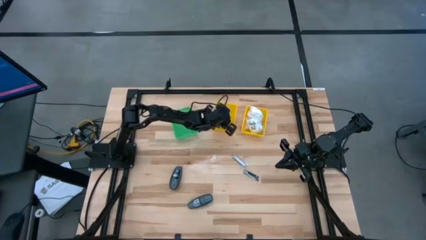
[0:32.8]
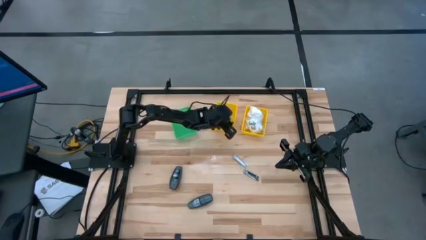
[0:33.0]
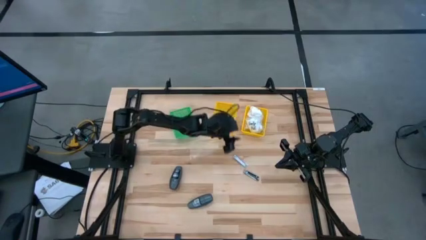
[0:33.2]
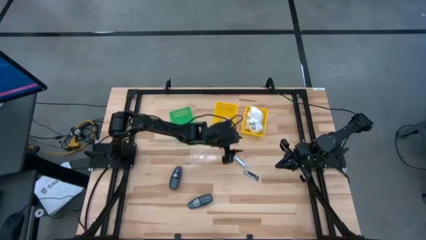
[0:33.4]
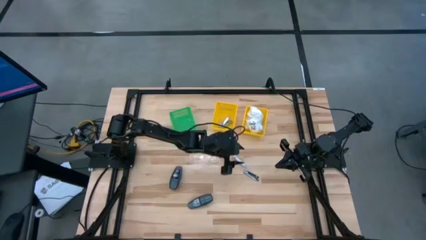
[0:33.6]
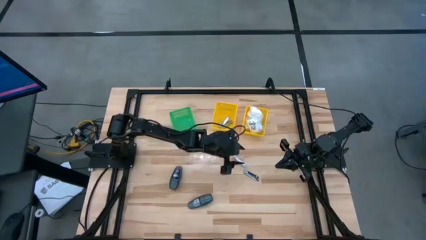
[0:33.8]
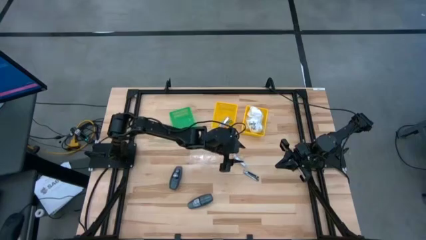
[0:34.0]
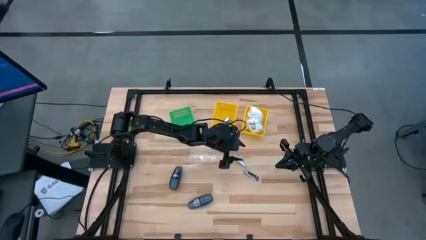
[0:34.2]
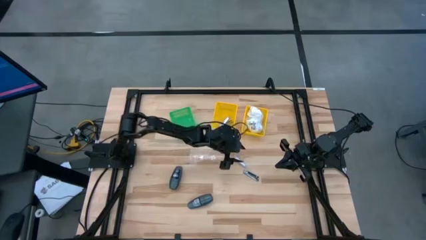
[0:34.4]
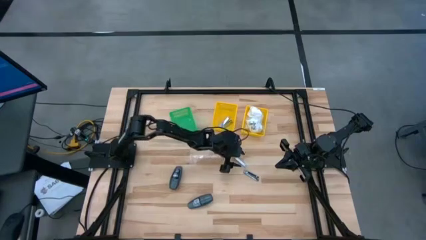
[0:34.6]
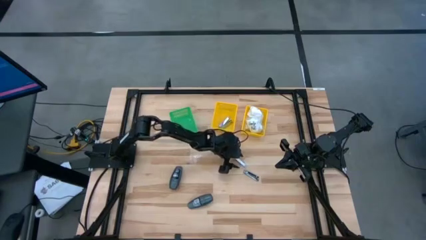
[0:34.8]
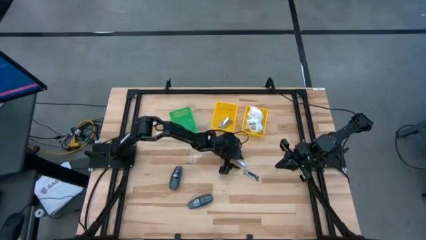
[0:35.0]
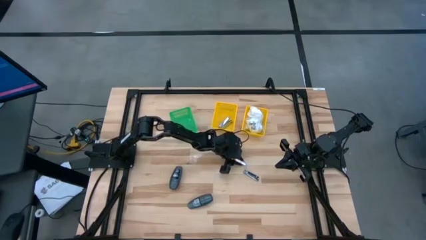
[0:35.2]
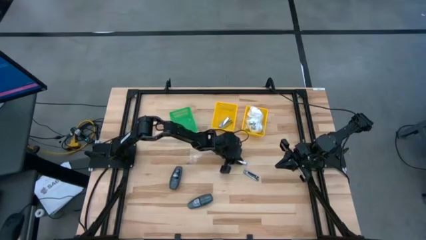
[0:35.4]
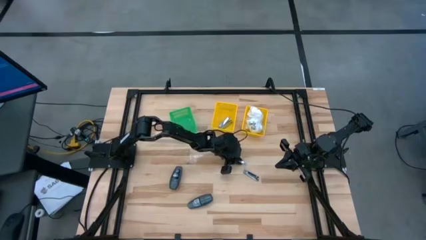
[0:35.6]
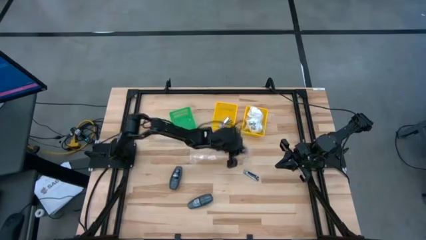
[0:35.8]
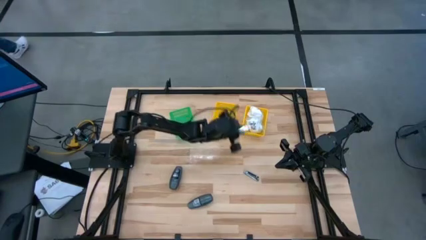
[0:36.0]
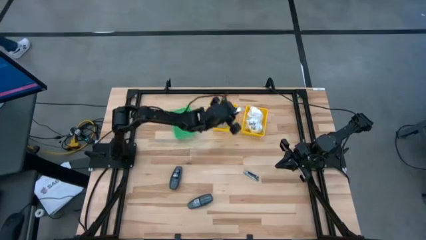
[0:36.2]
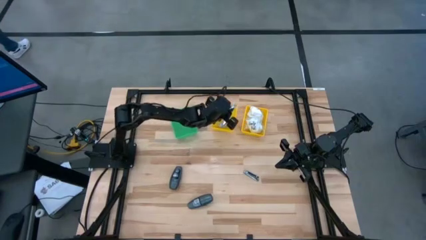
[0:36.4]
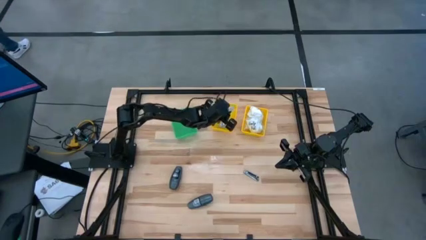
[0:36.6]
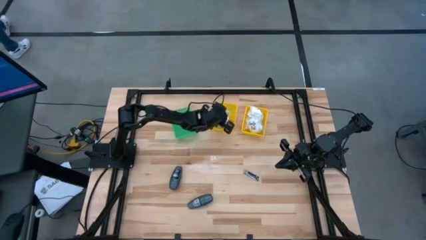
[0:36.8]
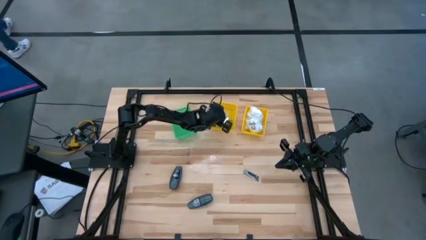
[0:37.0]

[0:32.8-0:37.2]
Task: Pick & Place Travel size toiletries
Put the silver nail cutter into the left yellow bin

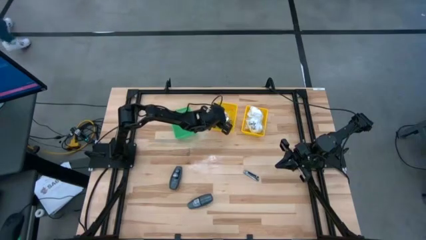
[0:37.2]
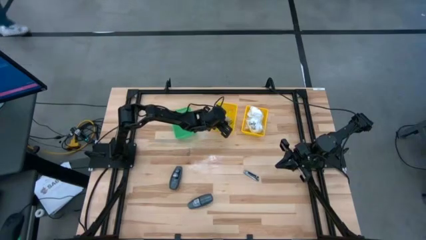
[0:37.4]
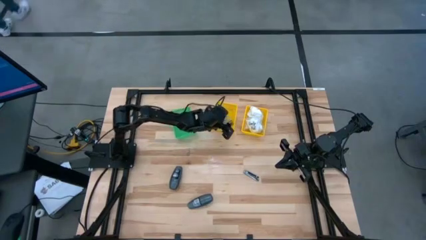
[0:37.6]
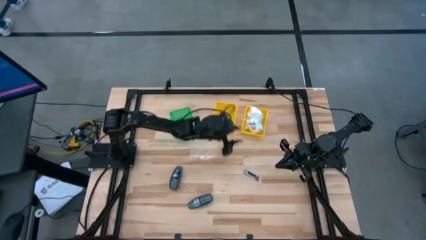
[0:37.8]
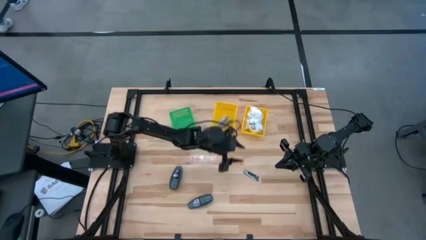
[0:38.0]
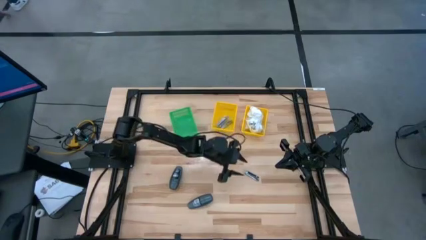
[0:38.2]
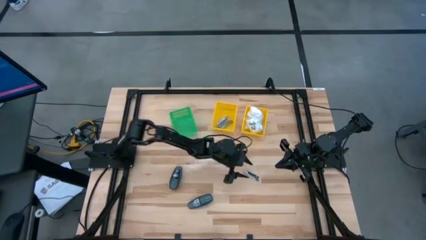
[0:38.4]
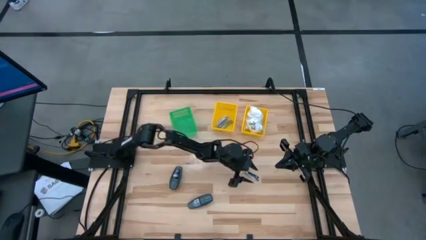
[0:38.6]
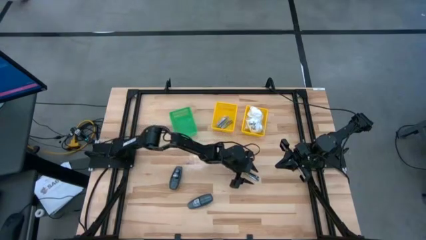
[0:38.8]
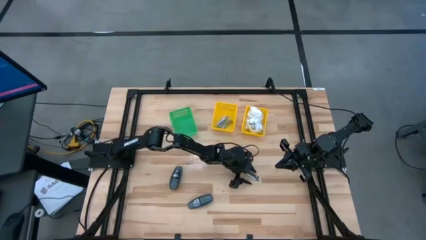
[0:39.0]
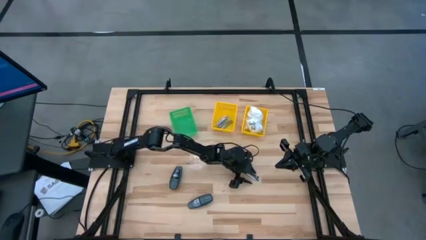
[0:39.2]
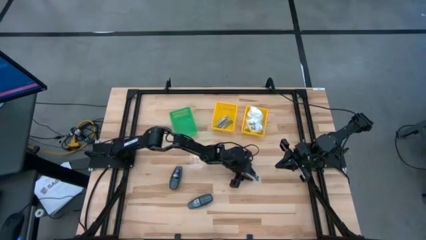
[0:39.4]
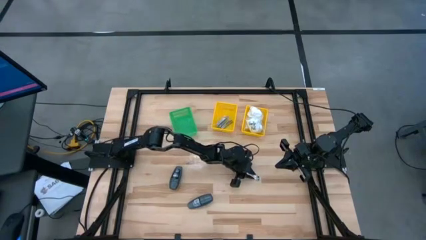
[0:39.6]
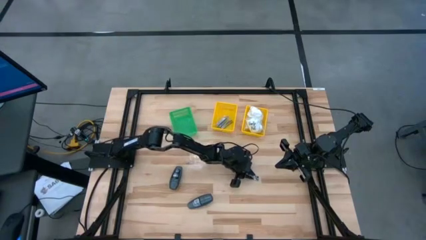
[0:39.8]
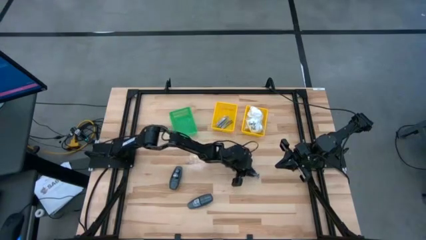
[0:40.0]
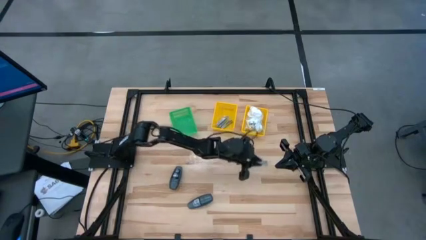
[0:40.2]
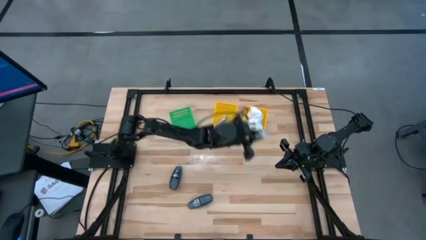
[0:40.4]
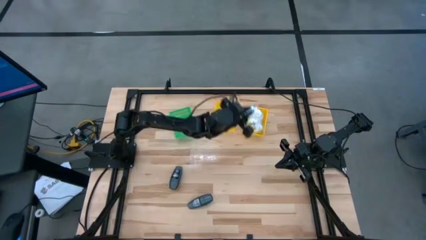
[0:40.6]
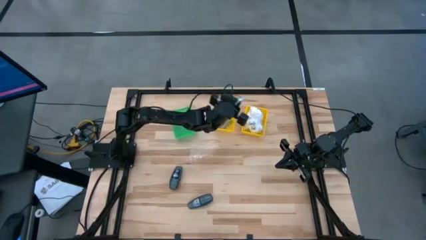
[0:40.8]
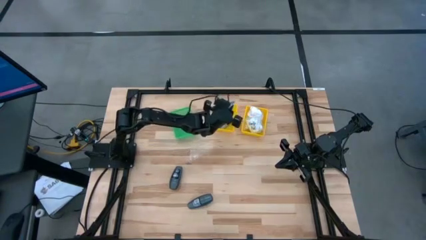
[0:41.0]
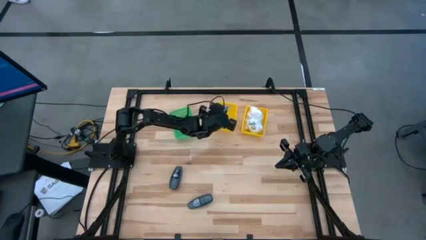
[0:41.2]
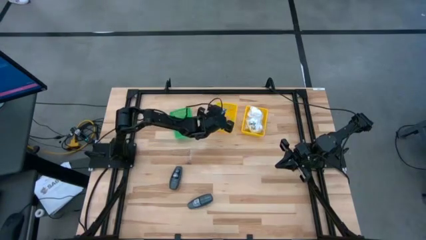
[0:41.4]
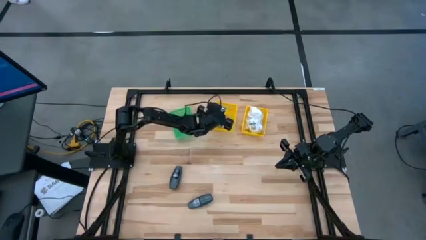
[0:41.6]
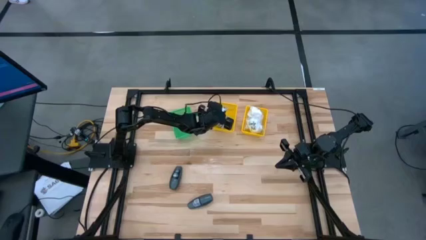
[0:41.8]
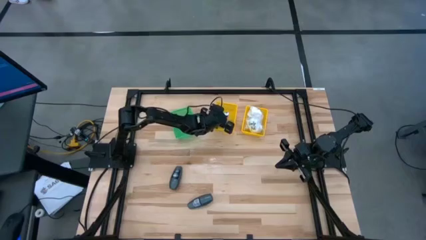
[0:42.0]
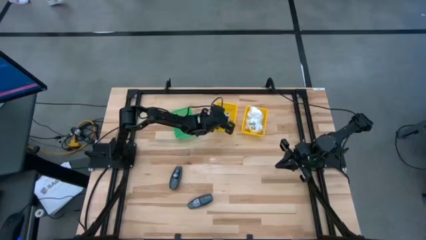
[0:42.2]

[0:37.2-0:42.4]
Put the silver nail cutter into the left yellow bin

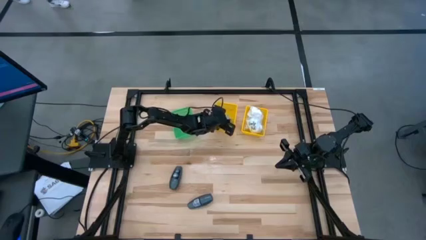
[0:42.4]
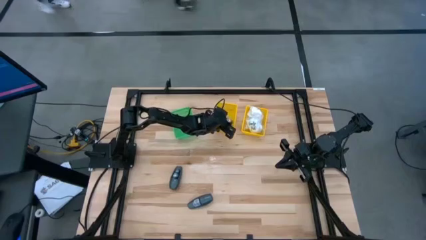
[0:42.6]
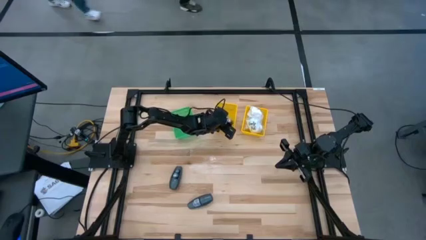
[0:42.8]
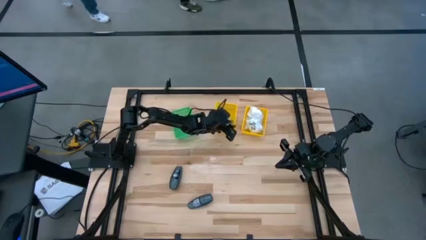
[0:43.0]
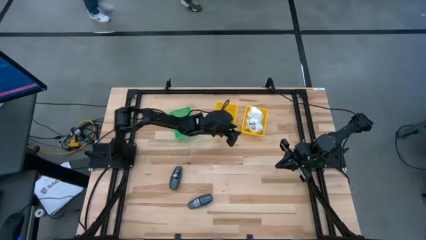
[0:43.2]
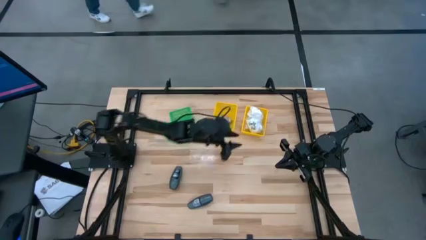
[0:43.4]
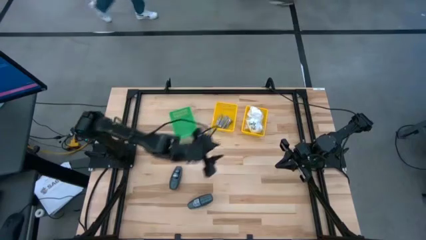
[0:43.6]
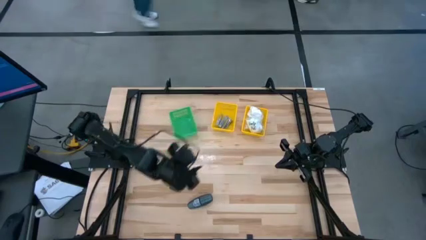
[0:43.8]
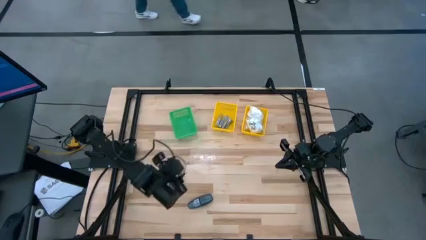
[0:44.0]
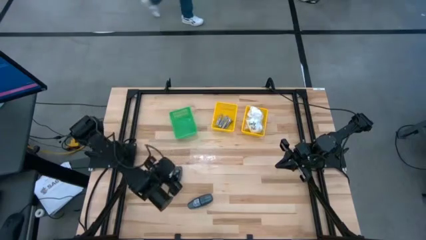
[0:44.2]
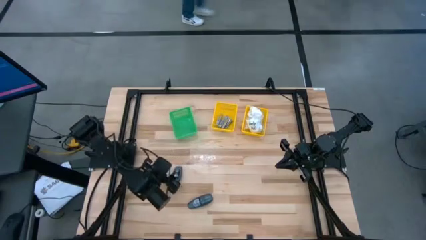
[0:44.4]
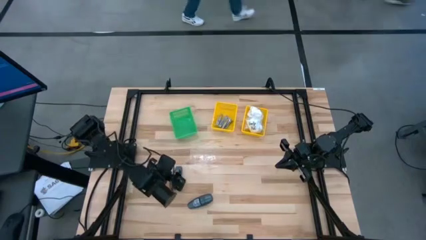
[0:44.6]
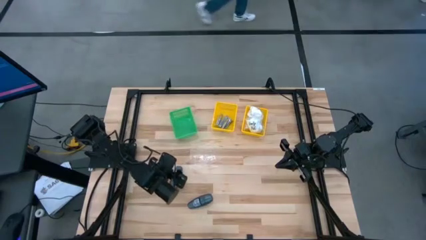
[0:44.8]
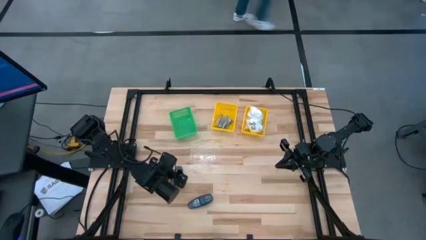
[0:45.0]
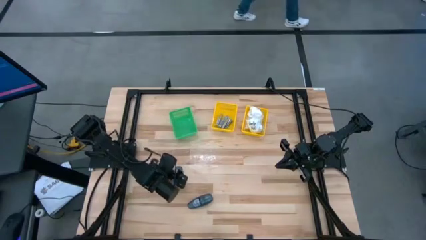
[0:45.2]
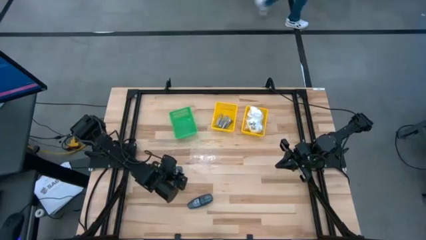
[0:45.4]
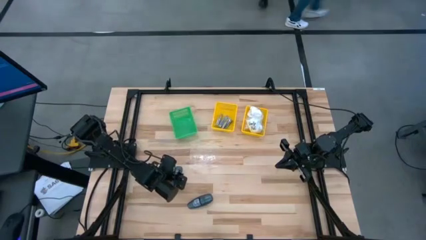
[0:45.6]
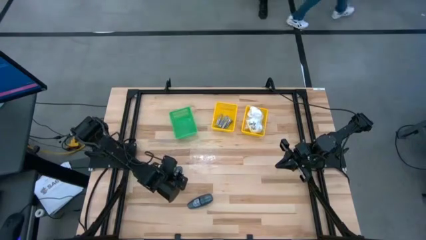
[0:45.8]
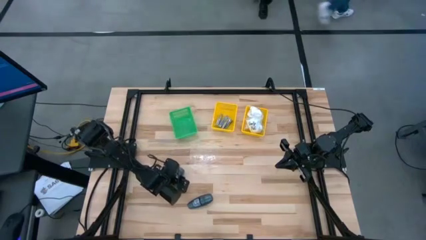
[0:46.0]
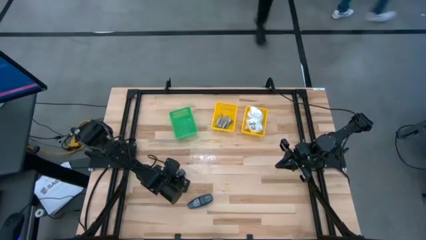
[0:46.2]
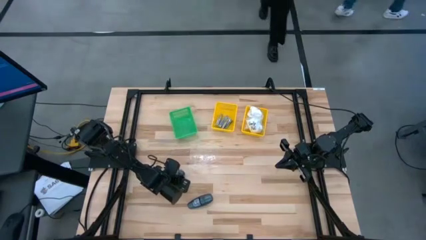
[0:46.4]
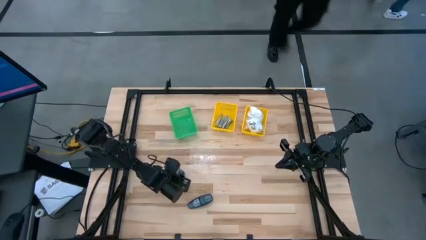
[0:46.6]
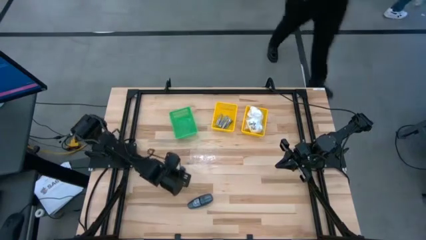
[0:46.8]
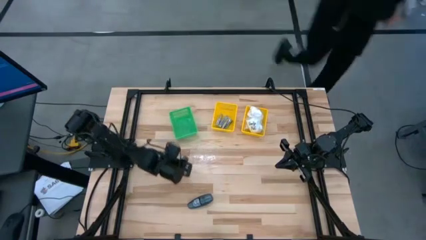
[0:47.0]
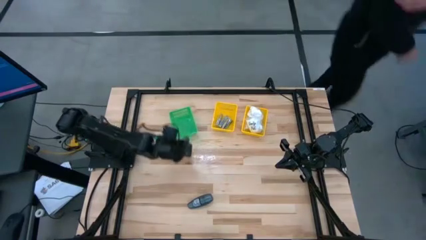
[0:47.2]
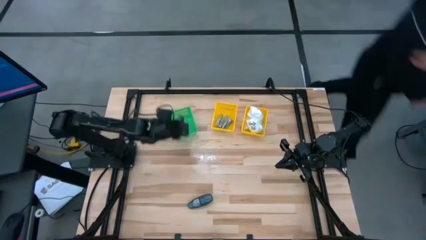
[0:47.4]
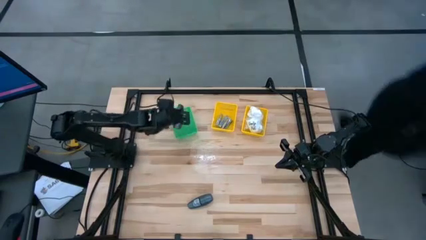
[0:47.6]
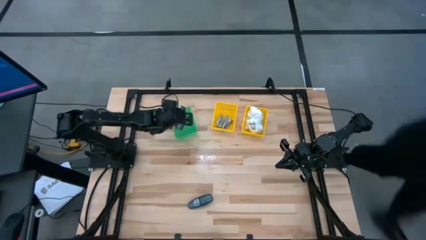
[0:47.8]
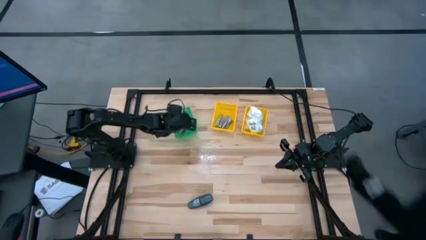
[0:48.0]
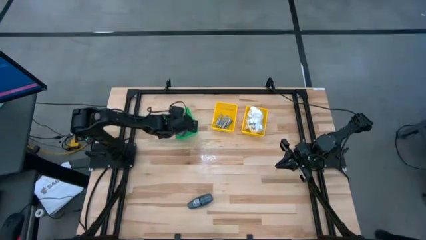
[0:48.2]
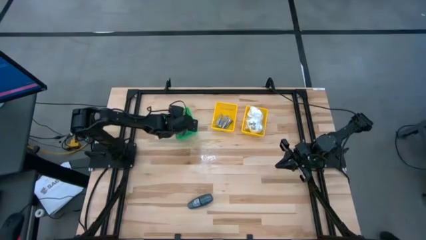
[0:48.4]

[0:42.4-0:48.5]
Put the black deodorant into the green bin
